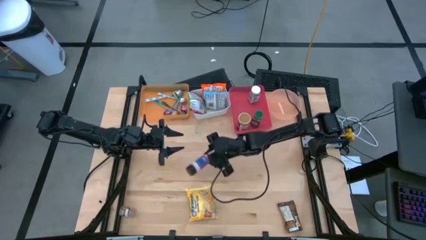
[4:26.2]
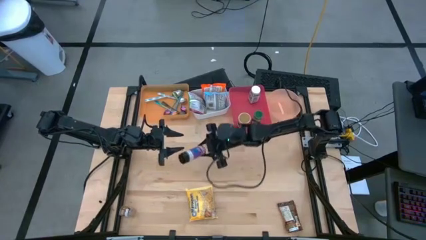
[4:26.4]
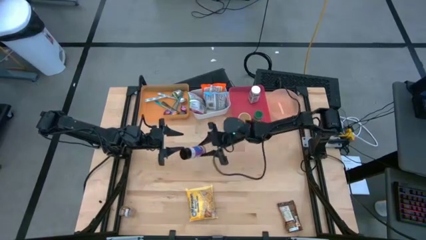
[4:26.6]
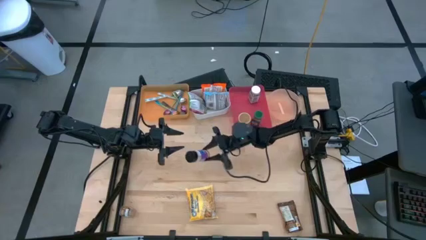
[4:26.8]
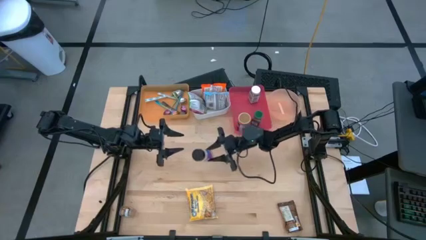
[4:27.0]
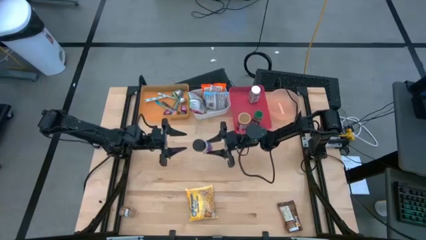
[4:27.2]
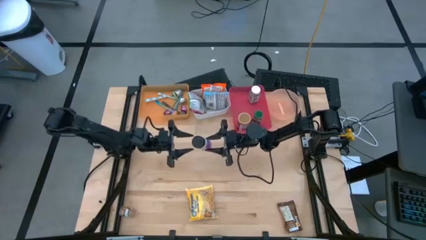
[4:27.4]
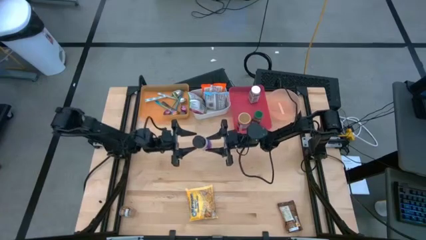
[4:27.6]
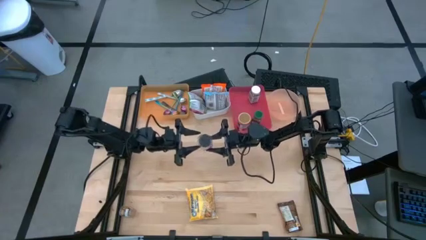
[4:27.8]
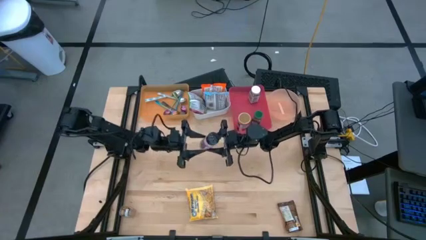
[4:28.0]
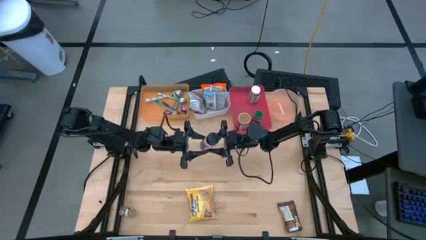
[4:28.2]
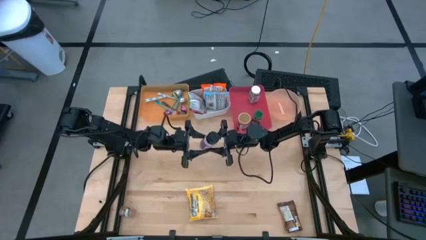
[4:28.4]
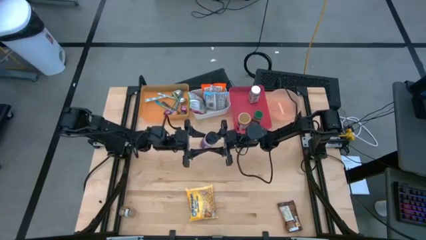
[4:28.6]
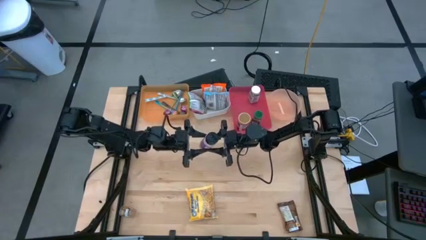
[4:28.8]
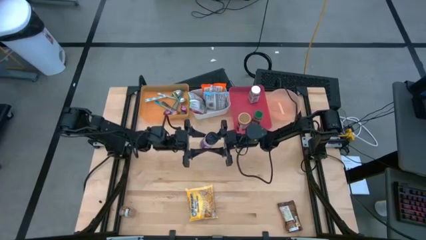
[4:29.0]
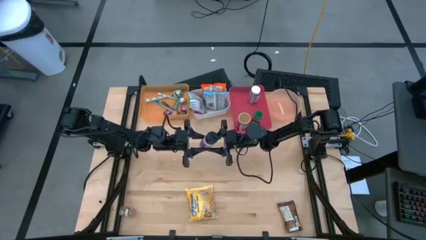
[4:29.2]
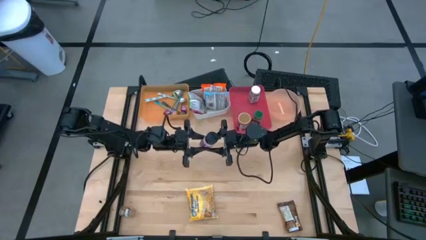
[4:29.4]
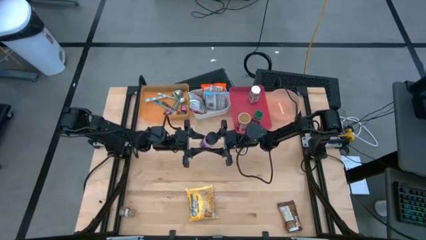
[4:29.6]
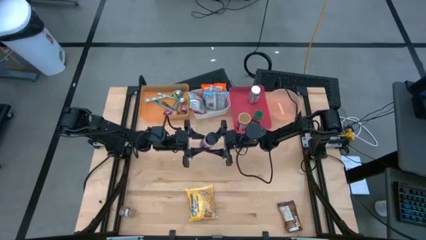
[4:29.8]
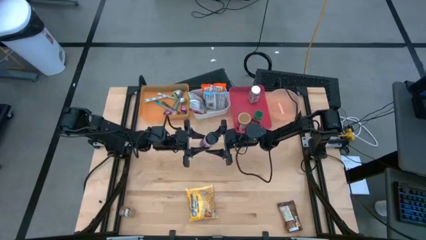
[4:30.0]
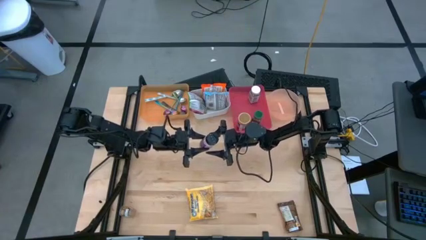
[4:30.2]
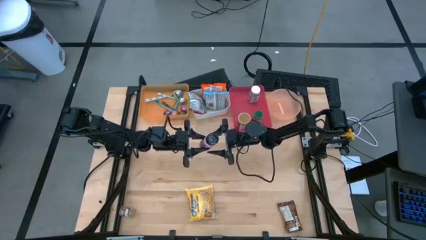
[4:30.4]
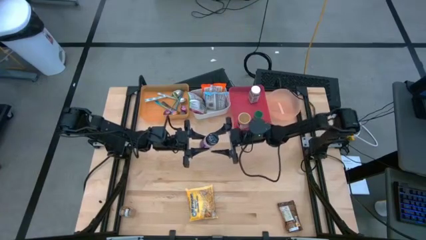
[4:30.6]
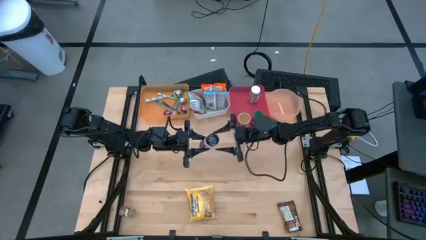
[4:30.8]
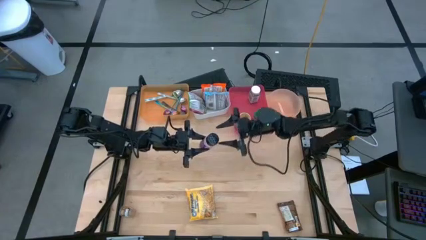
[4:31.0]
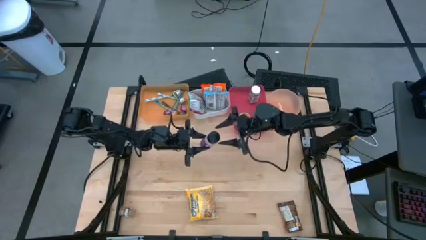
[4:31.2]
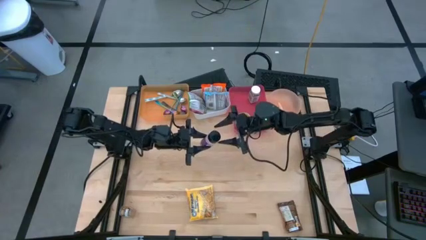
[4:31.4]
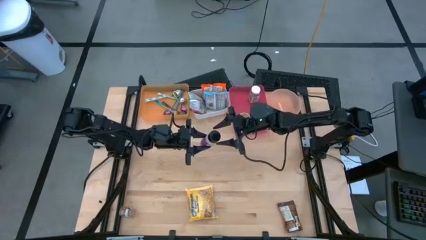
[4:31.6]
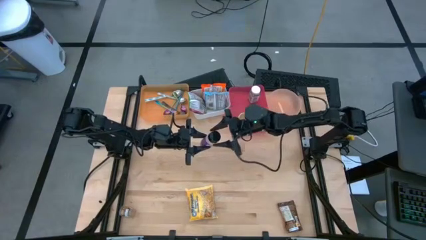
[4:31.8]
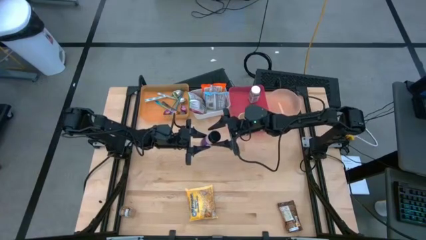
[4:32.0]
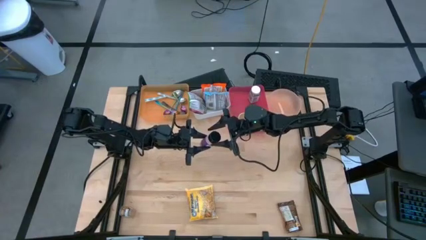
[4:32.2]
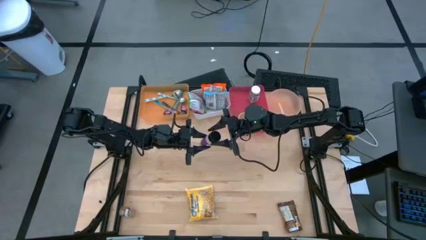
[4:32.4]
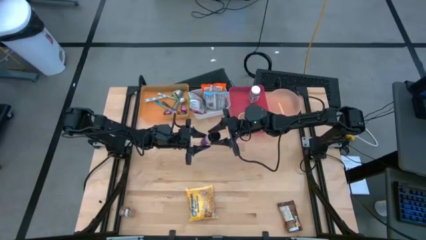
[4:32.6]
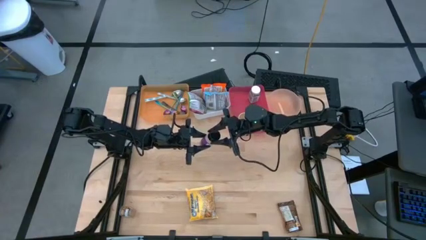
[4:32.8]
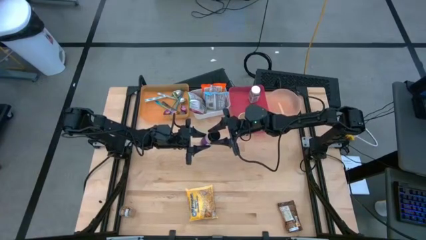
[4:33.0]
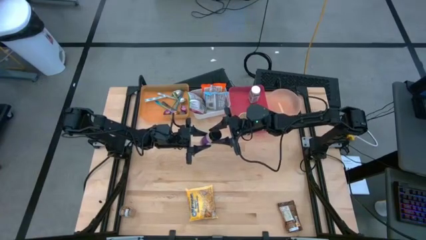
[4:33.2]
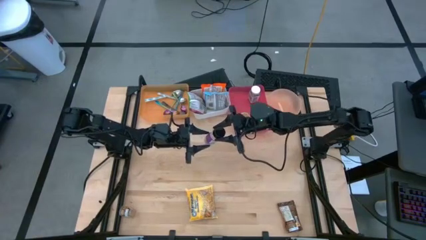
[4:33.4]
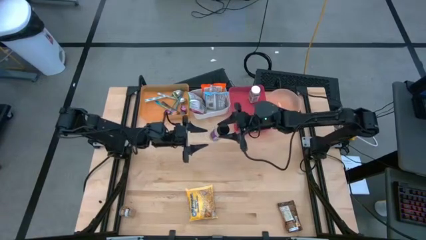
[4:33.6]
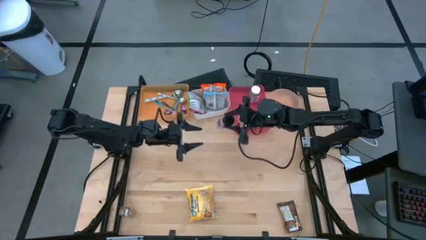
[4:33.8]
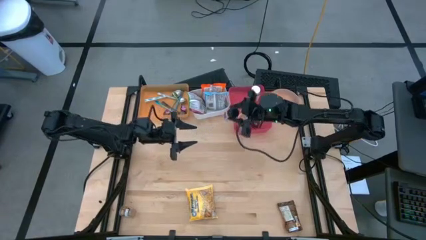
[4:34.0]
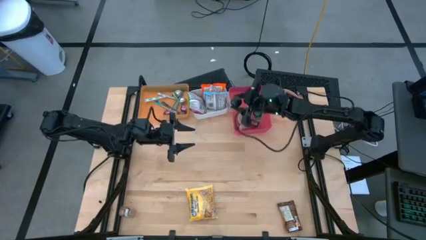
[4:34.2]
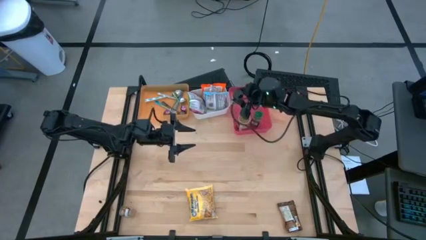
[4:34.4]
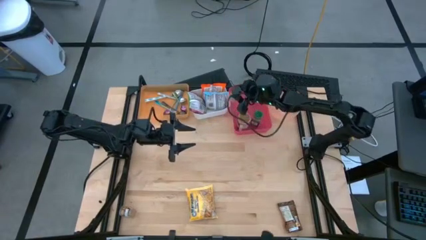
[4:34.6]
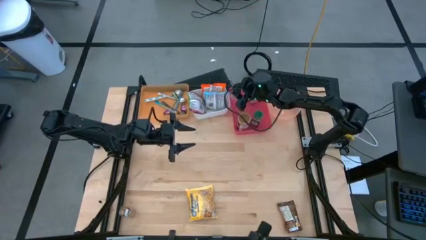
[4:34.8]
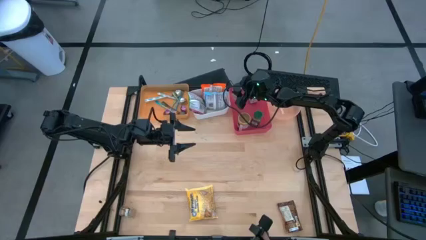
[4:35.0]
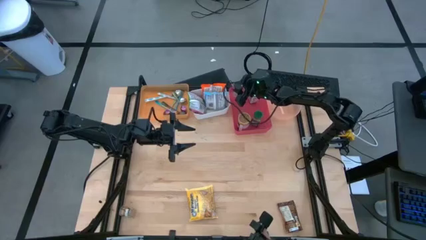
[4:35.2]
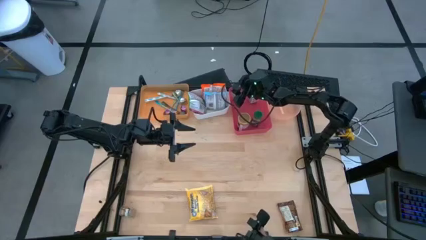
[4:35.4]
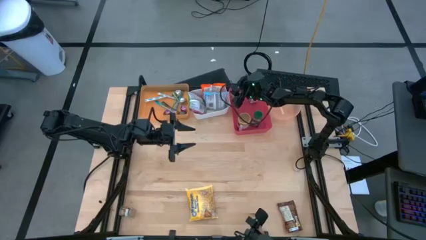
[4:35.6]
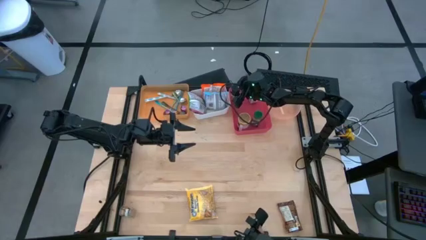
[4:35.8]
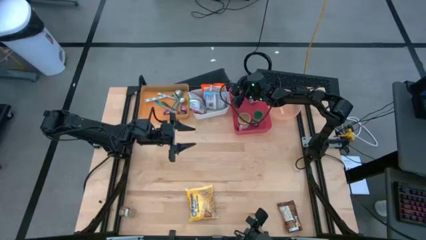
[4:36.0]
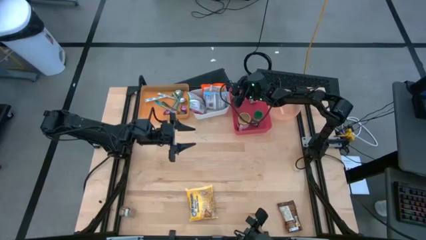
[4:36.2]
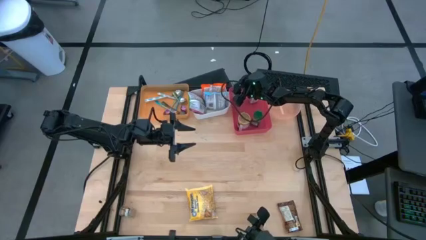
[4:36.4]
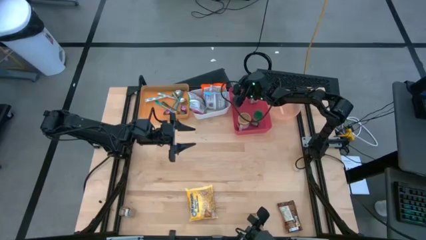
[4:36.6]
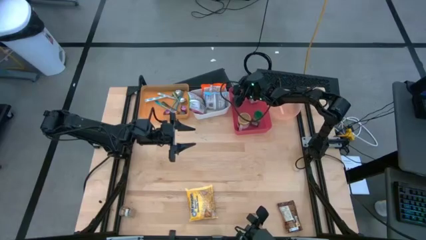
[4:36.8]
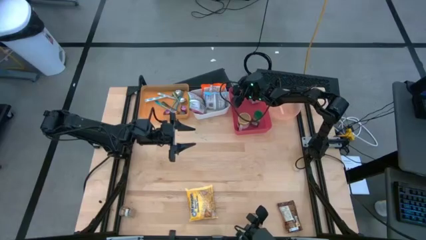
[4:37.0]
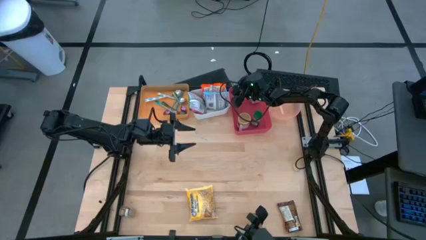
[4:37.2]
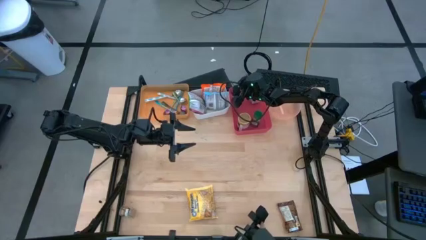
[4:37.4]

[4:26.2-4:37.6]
Task: Pick & Place Food Item
Put the purple seasoning bottle into the pink bin

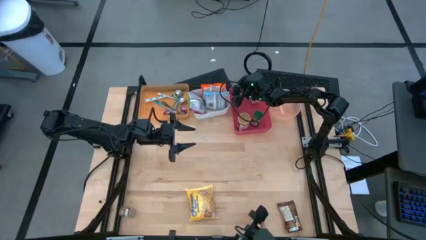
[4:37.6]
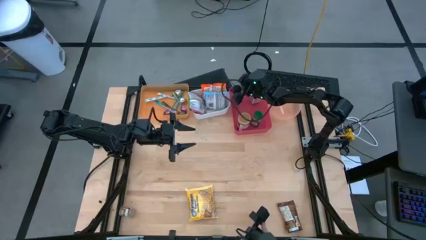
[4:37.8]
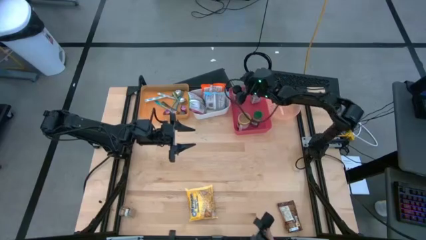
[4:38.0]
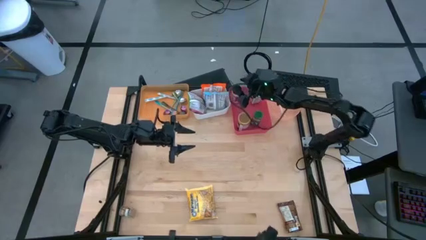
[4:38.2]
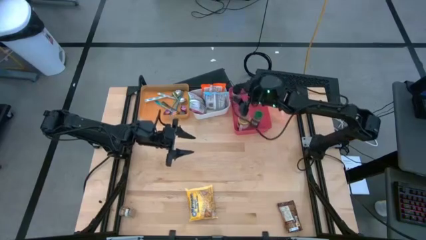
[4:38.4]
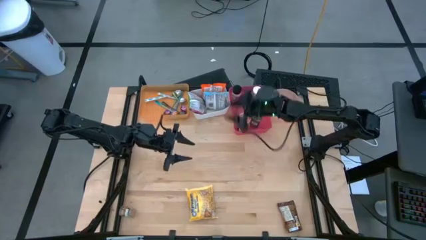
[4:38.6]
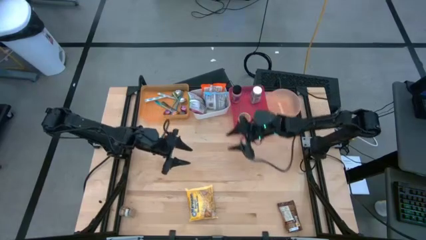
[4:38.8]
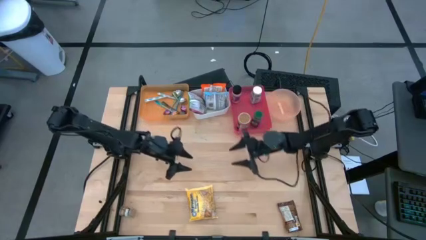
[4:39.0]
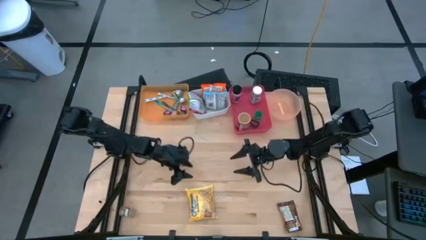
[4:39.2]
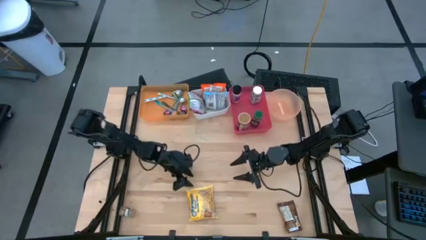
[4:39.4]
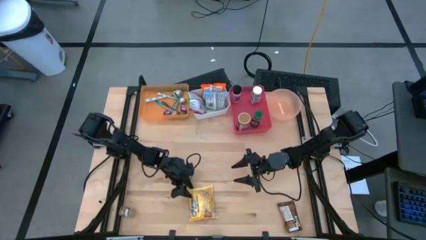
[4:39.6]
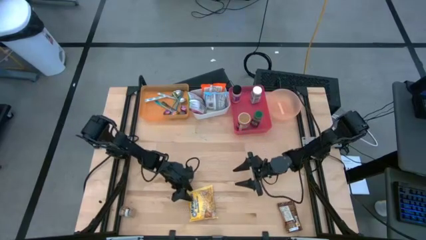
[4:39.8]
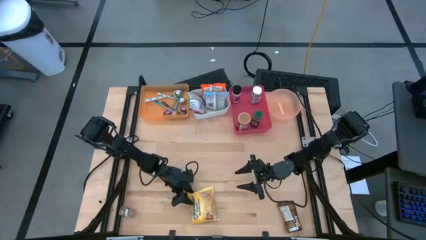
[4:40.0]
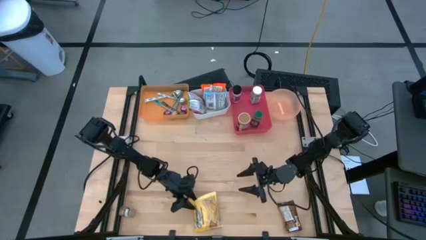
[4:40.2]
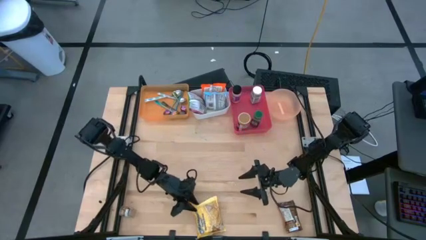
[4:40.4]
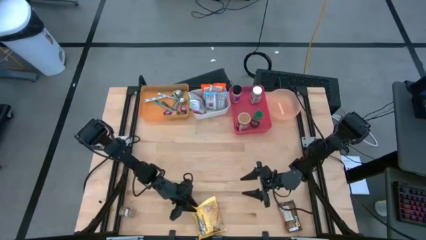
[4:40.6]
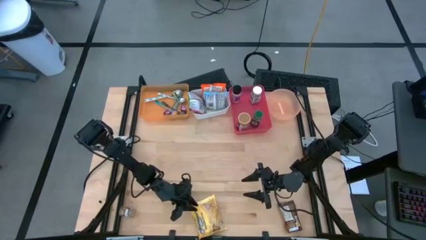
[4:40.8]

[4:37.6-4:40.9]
Put the yellow noodle pack into the white bin
